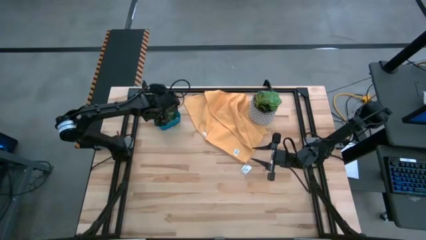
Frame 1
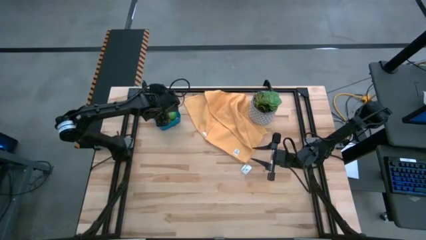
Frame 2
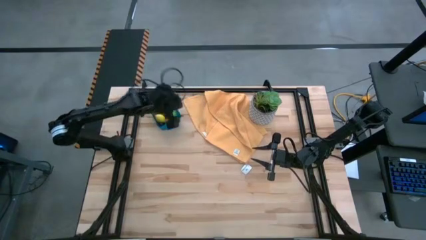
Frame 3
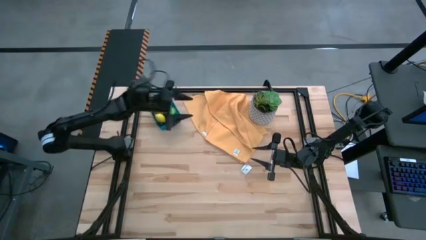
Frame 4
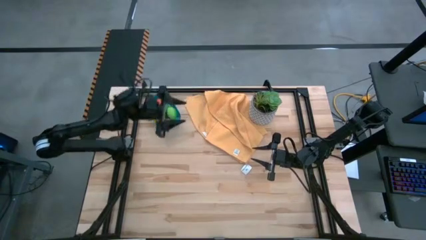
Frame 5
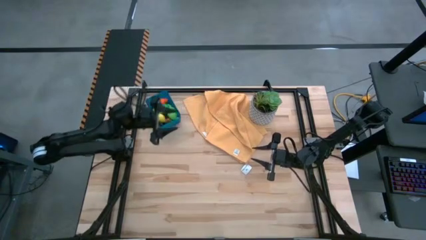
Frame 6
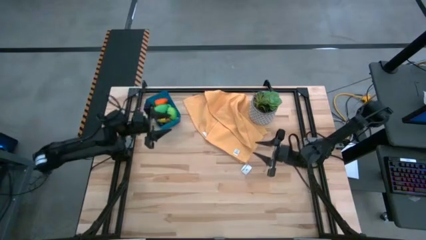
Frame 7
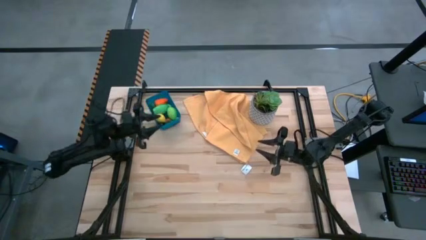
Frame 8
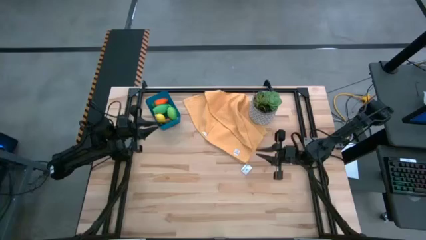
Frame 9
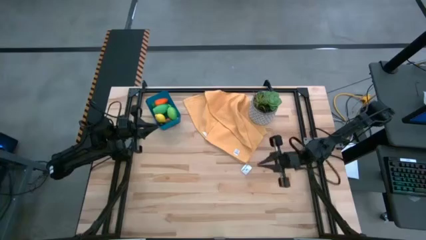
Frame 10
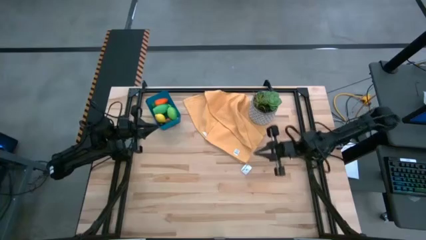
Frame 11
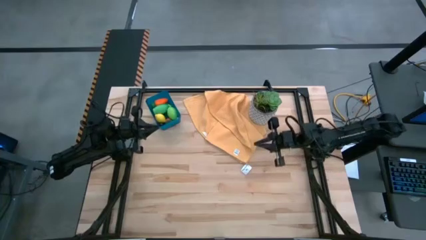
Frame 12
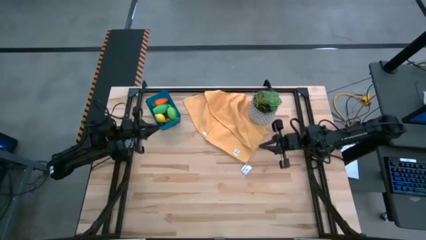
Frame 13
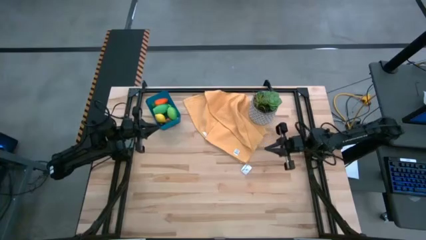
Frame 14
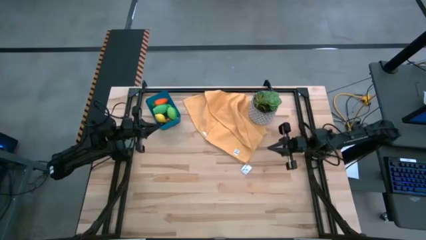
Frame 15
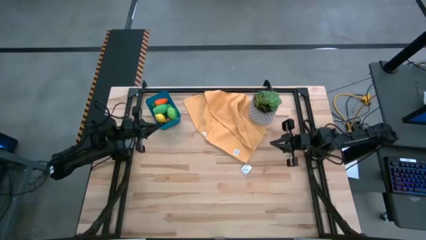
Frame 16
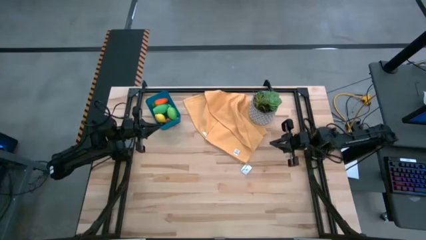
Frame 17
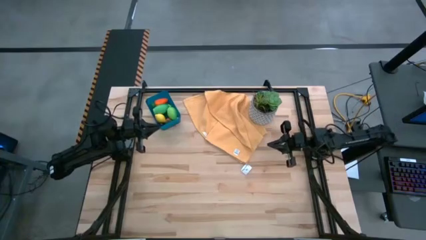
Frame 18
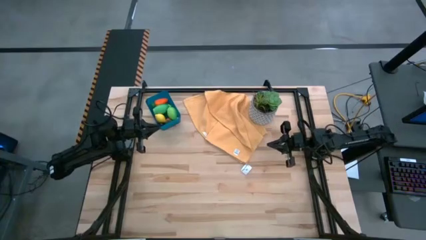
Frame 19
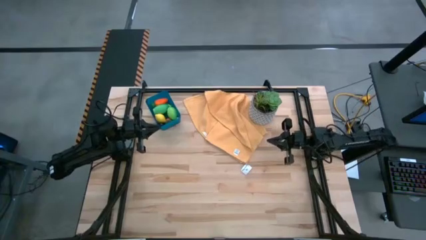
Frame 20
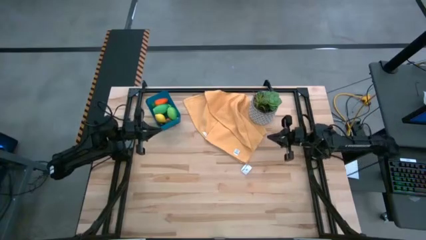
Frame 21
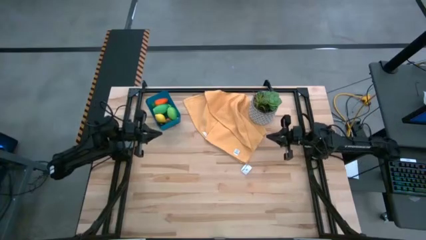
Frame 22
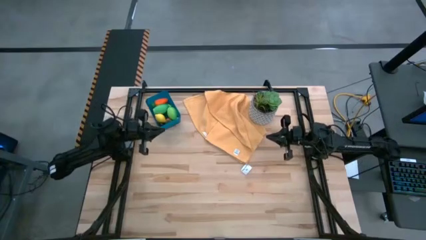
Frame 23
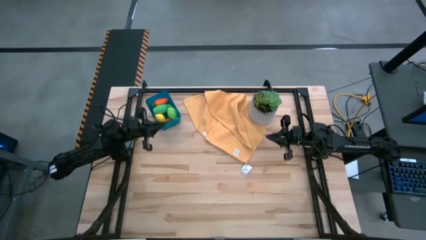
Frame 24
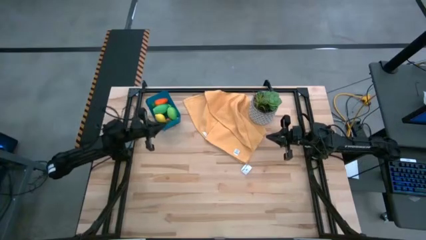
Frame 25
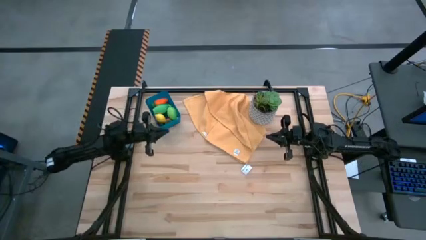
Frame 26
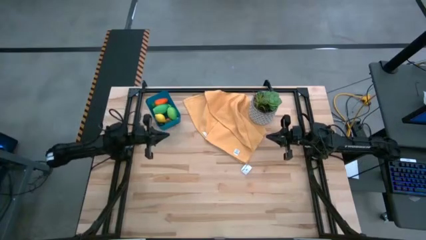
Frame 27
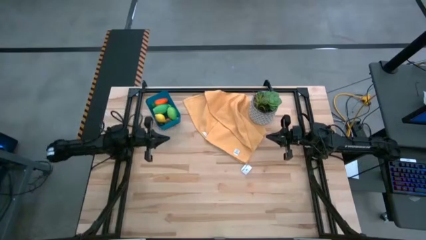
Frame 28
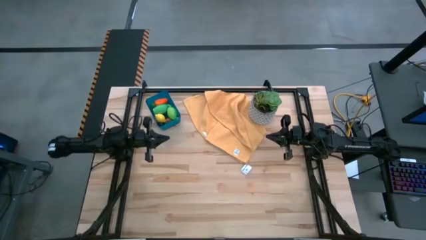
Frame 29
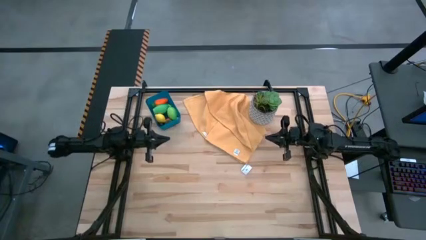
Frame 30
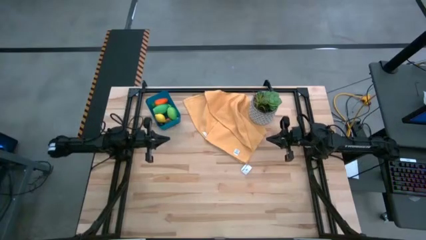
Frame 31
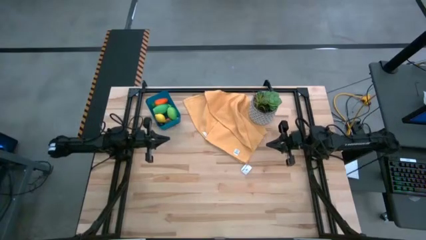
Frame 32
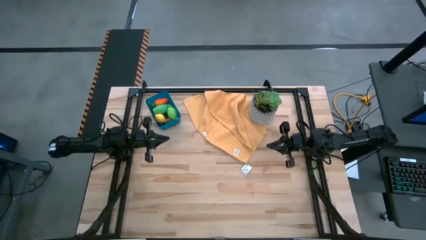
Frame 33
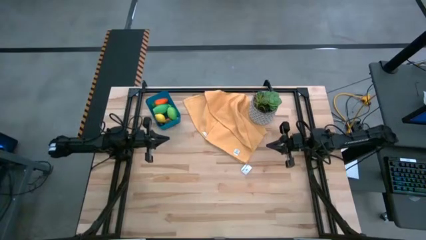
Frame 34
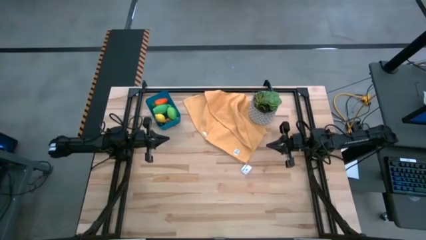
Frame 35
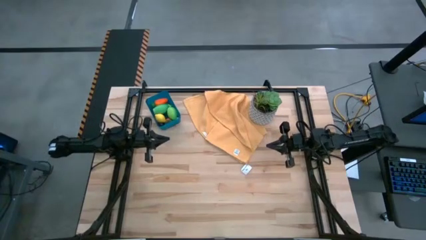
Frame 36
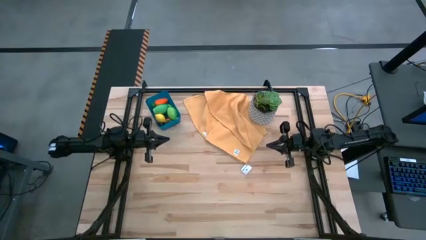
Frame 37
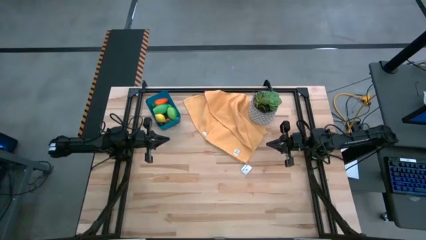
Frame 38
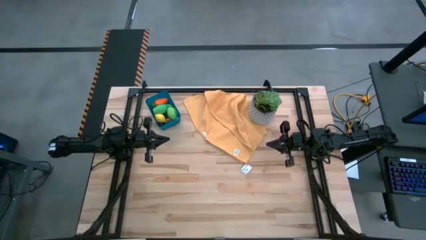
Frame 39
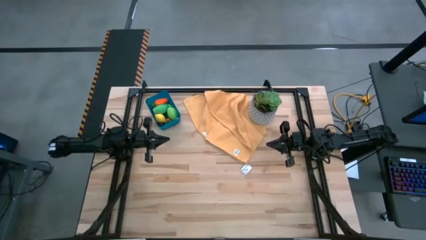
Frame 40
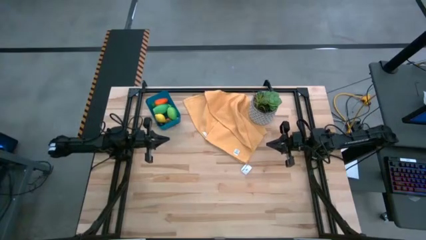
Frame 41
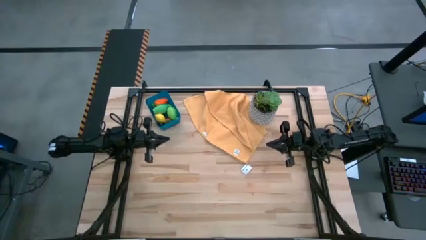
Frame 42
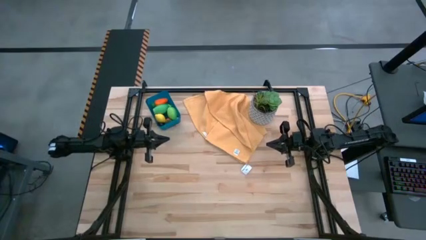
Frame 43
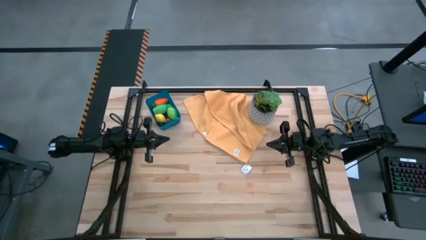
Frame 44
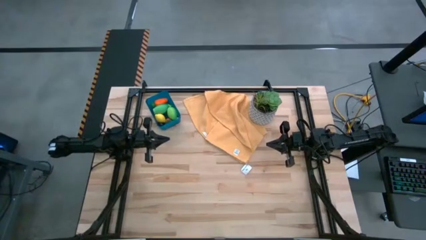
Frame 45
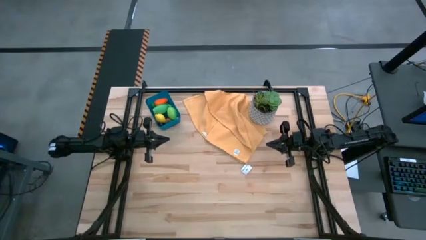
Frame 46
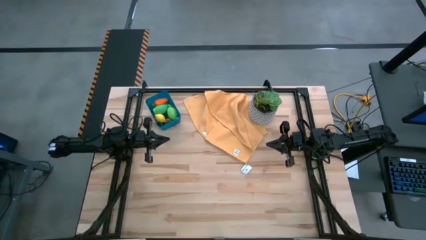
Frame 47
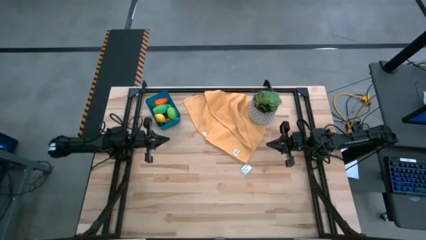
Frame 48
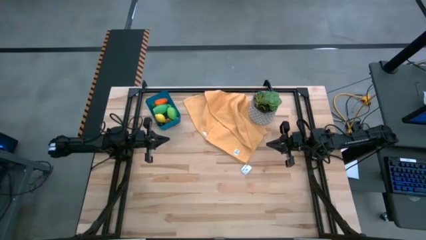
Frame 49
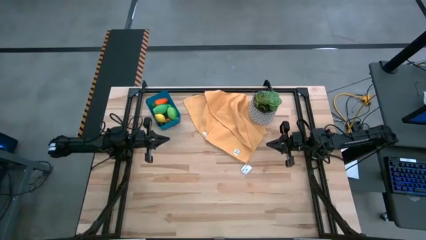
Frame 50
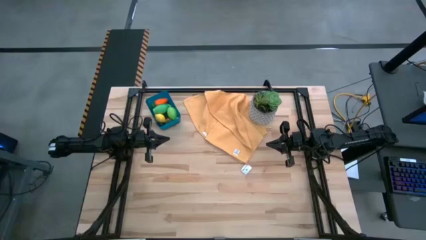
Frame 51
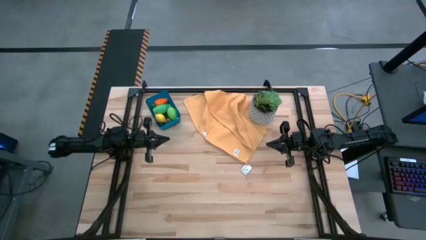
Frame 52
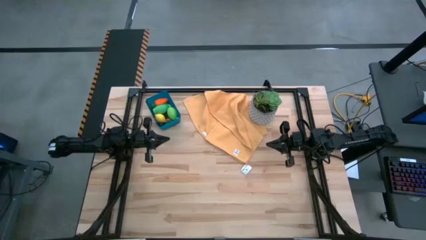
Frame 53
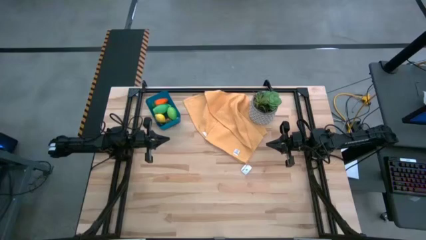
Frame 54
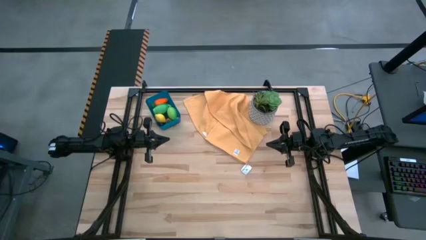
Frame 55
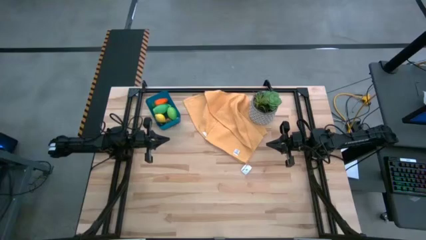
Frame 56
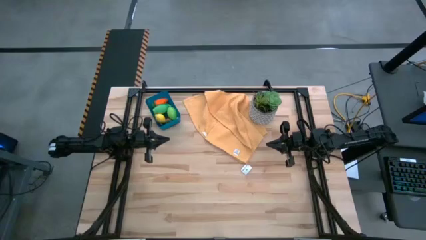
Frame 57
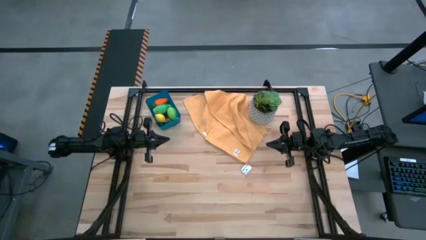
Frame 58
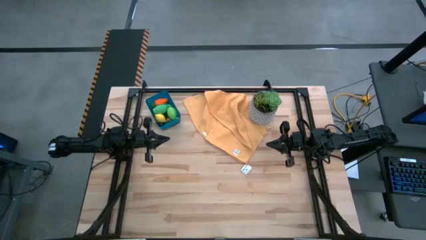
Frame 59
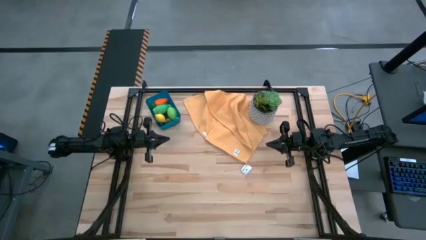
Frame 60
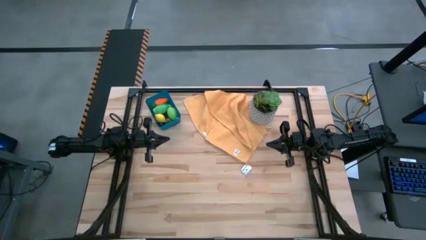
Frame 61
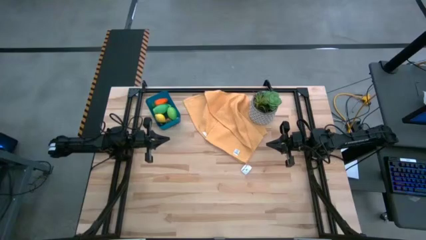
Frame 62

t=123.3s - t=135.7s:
Task: Pick and placing Produce into tupperware
Return to Home Position

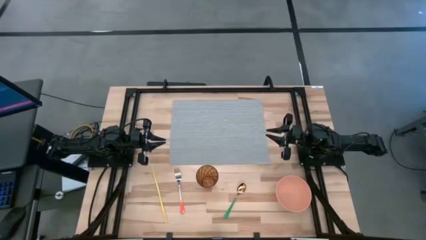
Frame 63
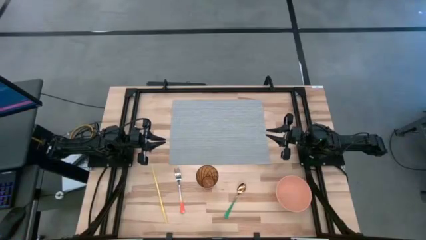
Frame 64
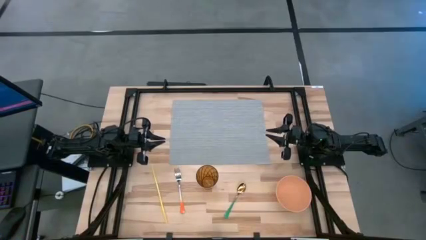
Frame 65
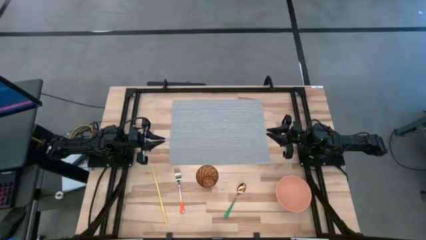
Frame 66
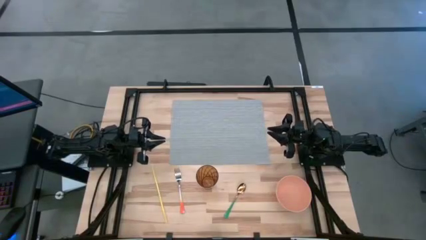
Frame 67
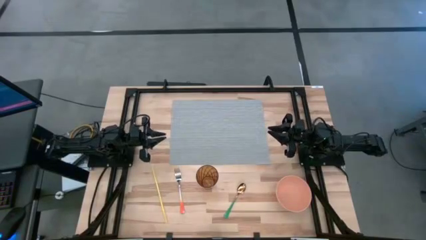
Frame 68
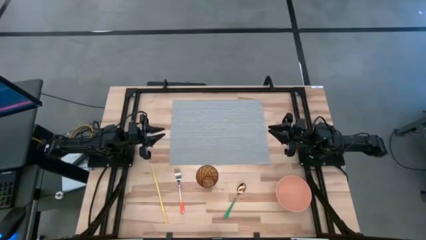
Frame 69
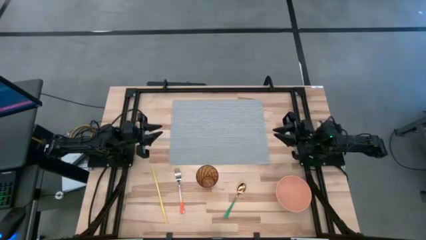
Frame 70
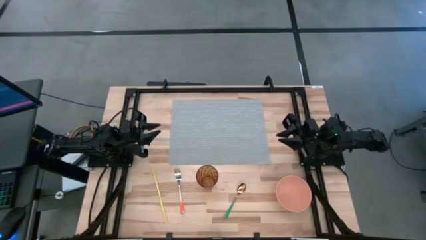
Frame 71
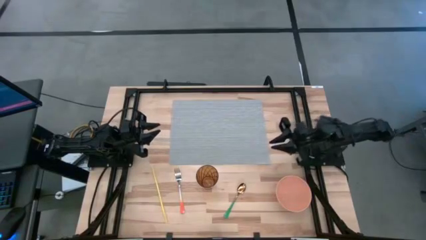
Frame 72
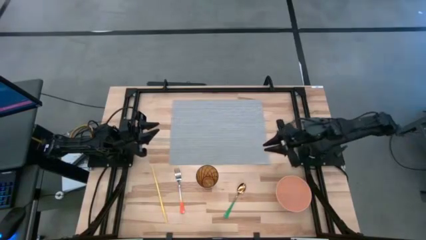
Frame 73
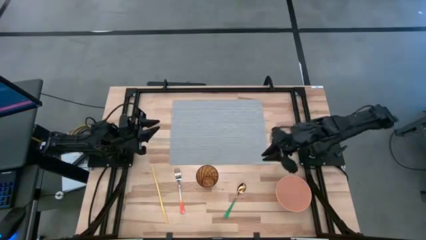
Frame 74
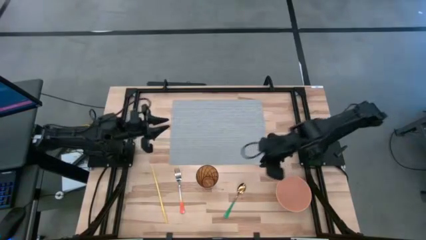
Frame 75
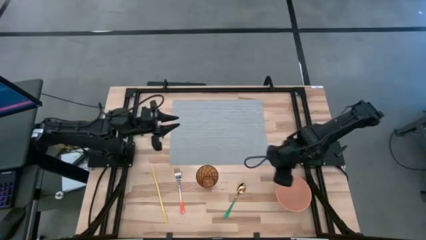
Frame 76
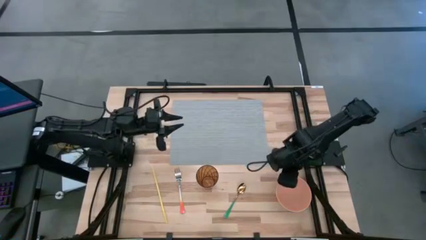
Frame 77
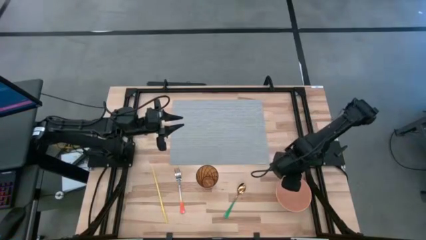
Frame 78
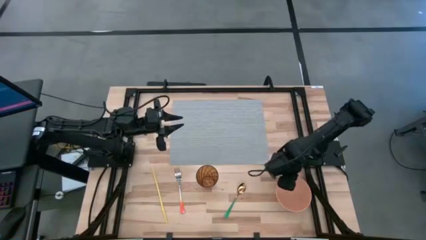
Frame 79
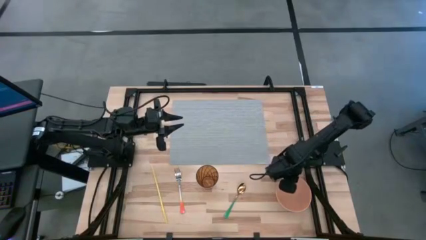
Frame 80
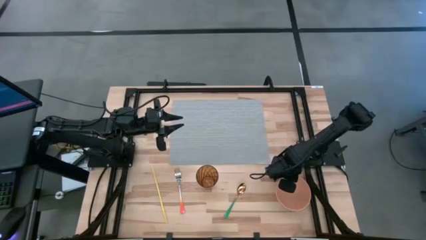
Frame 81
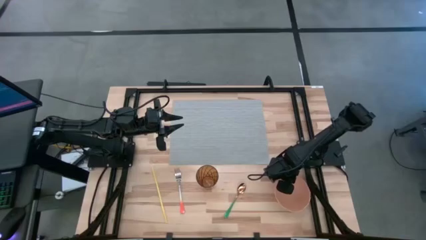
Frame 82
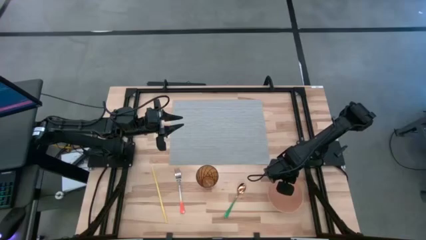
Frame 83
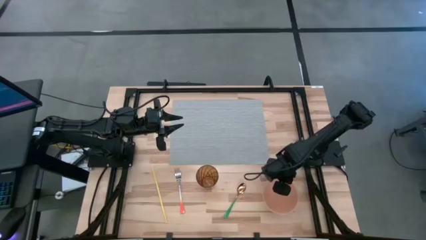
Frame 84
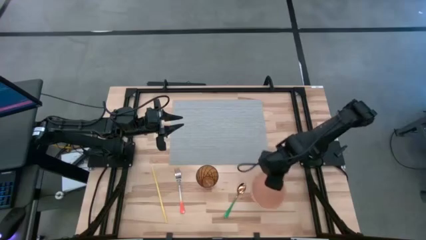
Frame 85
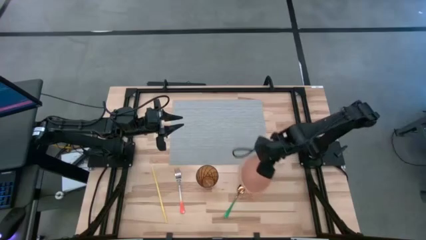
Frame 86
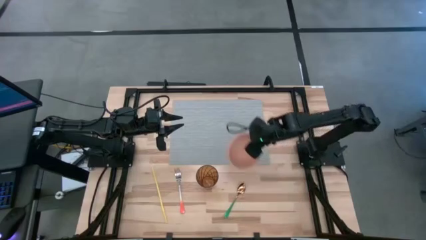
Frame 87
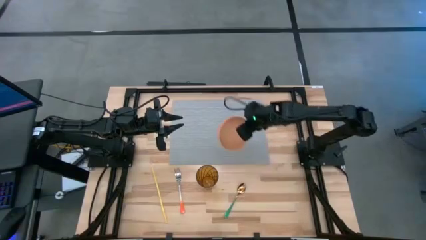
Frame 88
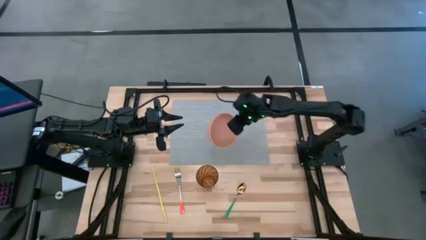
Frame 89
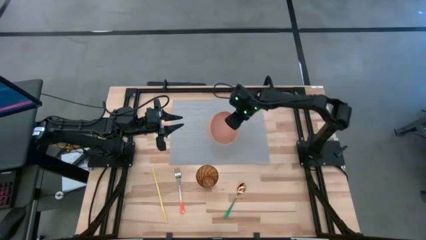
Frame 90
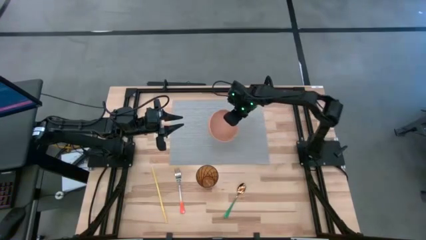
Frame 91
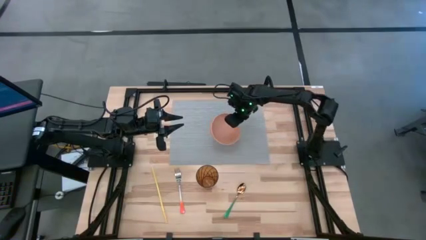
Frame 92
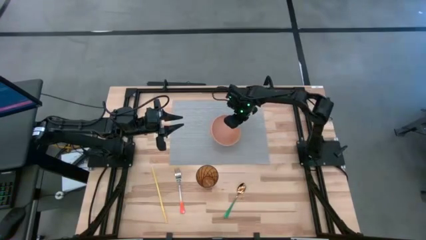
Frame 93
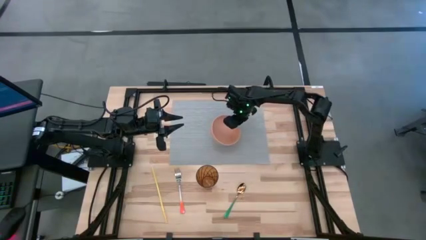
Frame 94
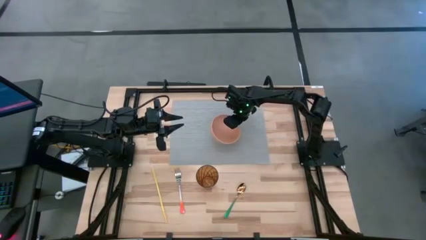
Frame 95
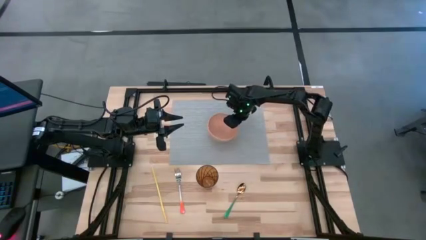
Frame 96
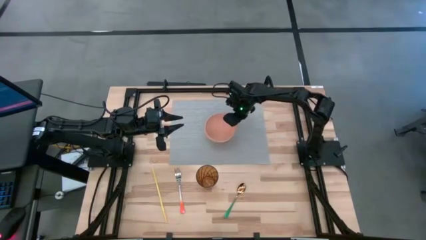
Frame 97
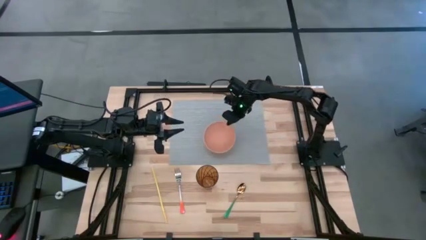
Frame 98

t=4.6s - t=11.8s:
Task: Pick & Place Utensil
Put the light orange bowl on the gray placemat
